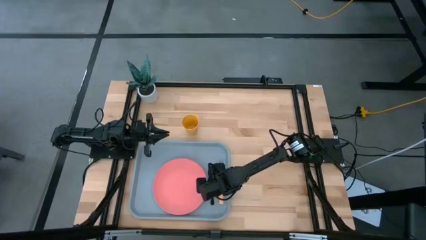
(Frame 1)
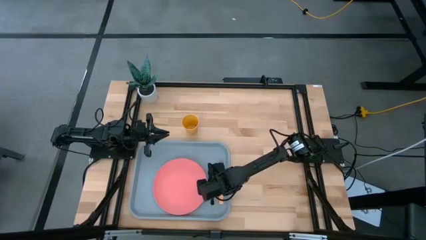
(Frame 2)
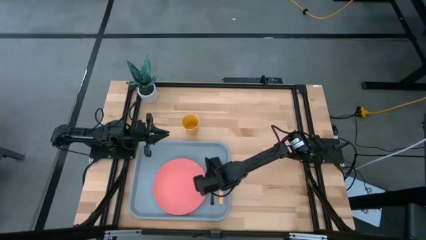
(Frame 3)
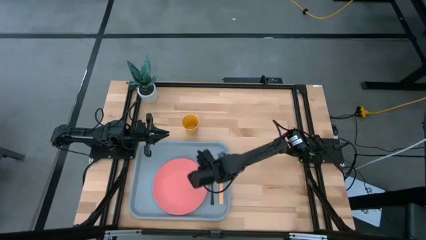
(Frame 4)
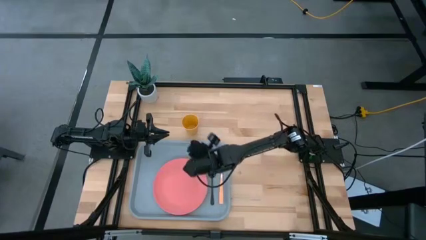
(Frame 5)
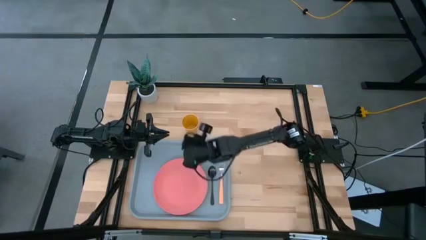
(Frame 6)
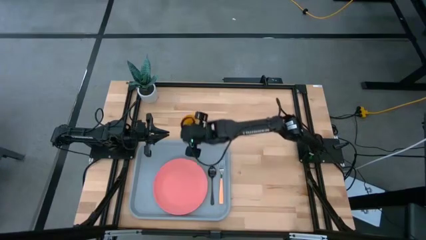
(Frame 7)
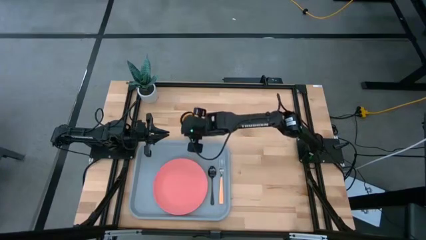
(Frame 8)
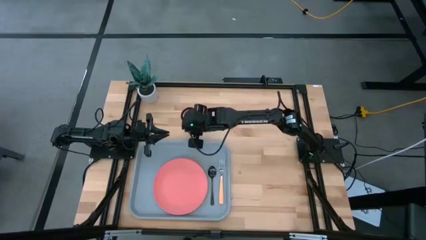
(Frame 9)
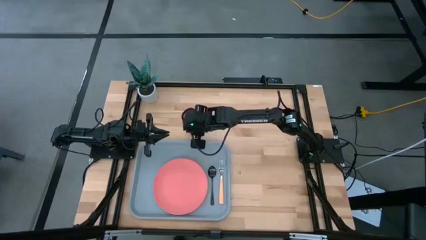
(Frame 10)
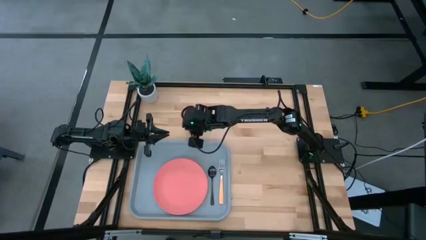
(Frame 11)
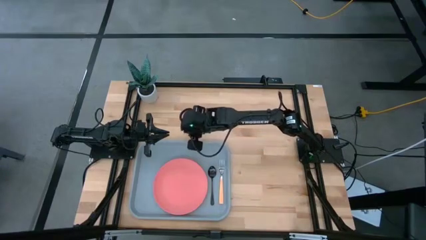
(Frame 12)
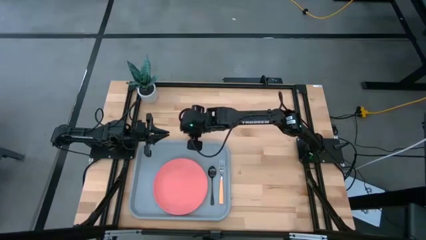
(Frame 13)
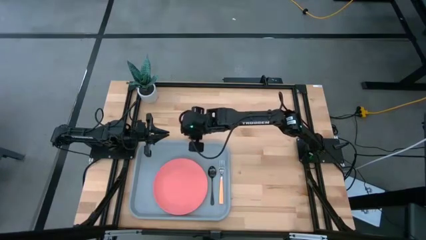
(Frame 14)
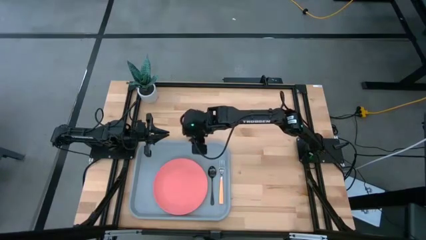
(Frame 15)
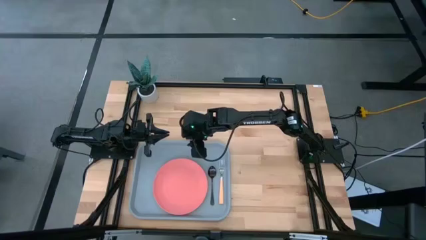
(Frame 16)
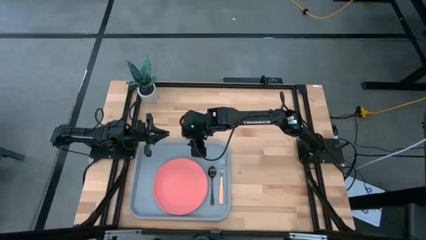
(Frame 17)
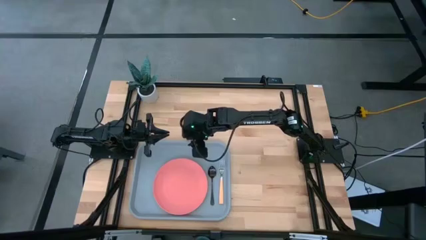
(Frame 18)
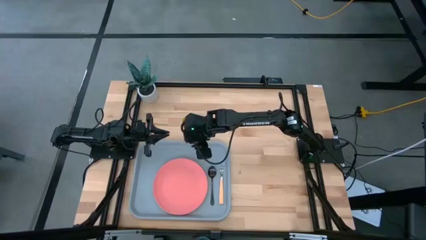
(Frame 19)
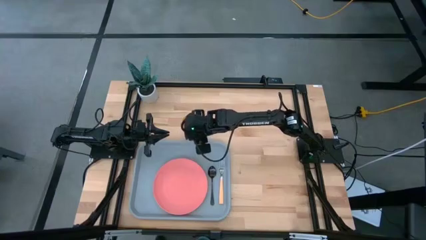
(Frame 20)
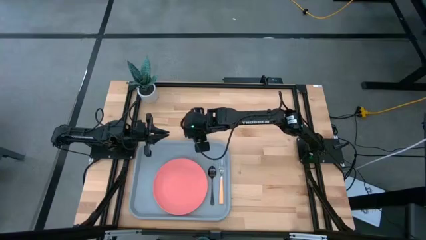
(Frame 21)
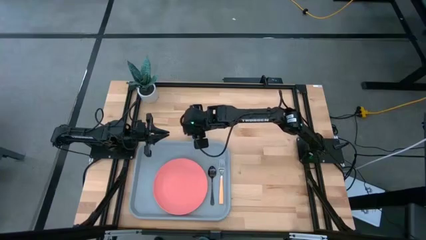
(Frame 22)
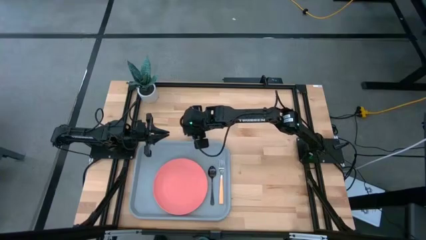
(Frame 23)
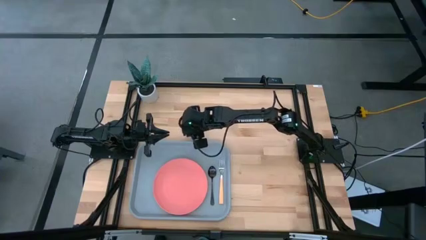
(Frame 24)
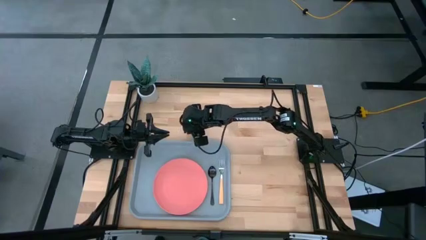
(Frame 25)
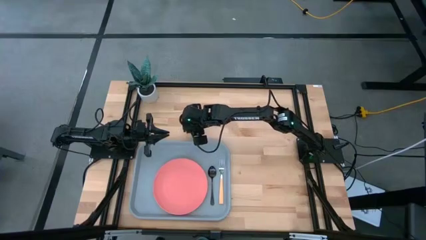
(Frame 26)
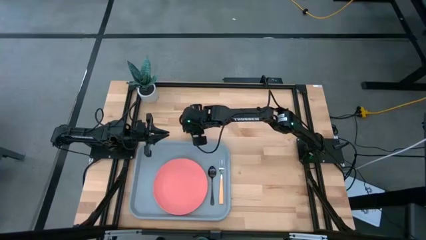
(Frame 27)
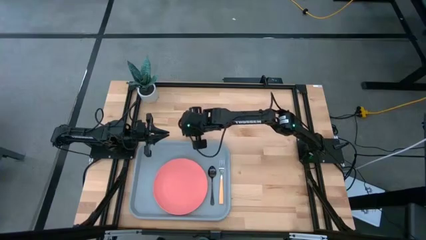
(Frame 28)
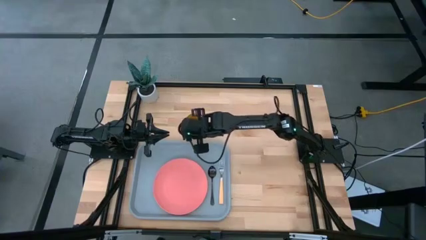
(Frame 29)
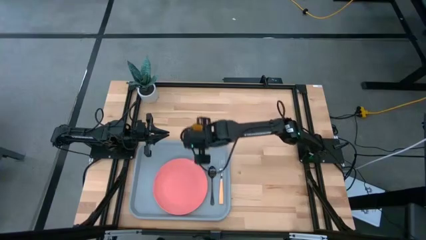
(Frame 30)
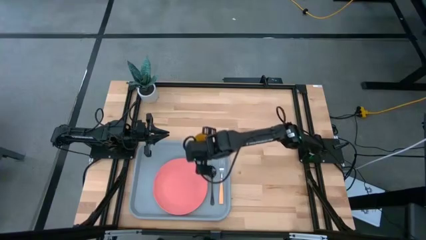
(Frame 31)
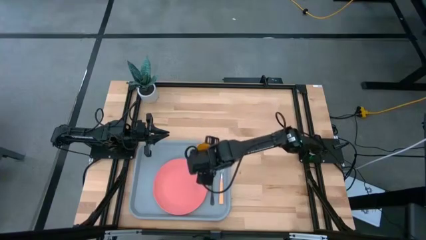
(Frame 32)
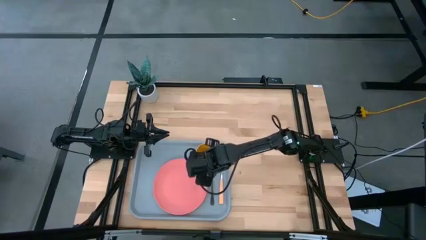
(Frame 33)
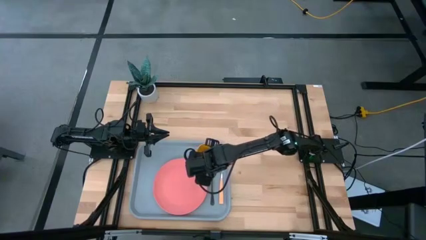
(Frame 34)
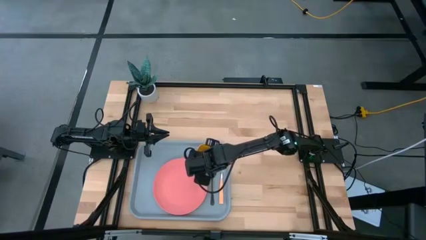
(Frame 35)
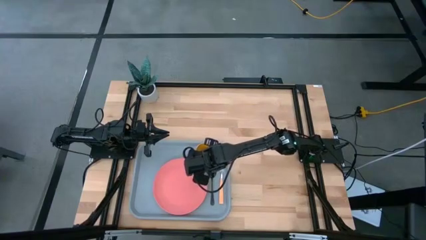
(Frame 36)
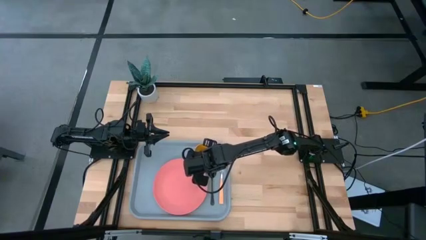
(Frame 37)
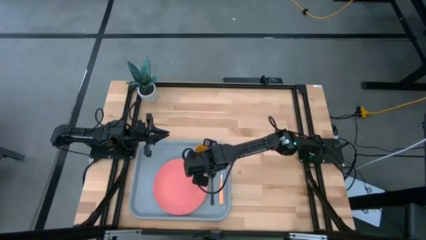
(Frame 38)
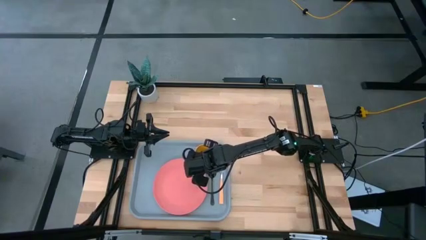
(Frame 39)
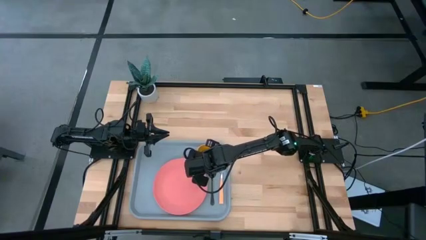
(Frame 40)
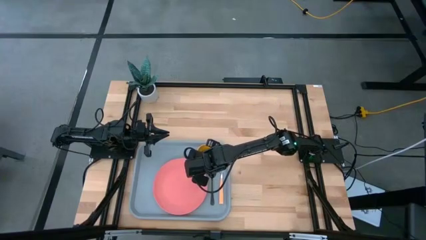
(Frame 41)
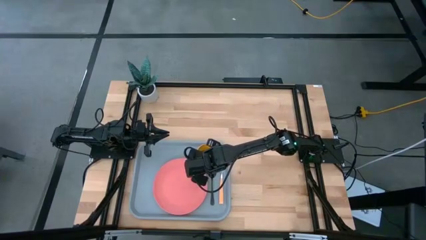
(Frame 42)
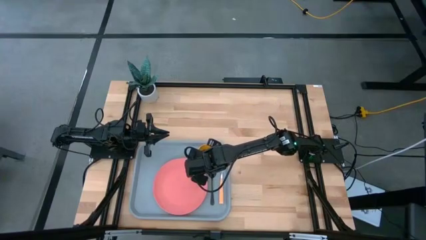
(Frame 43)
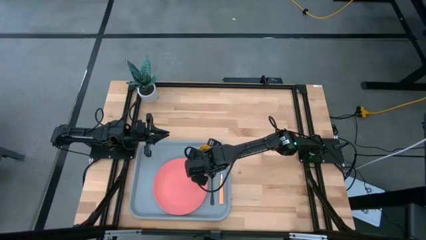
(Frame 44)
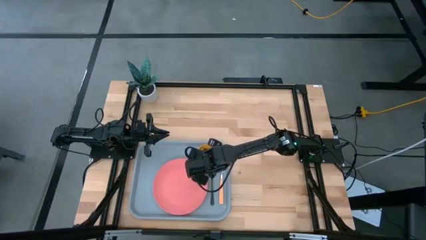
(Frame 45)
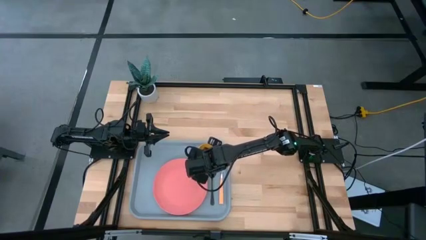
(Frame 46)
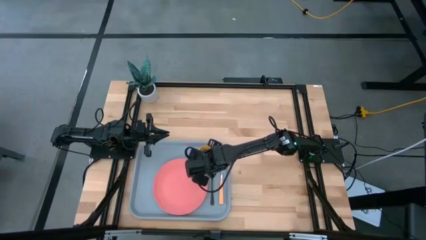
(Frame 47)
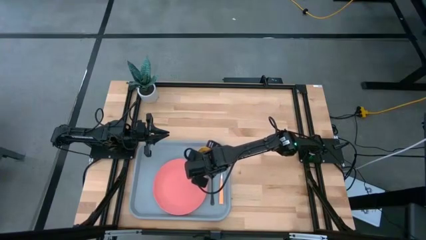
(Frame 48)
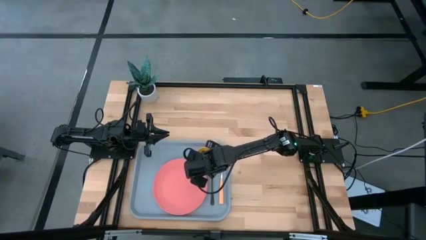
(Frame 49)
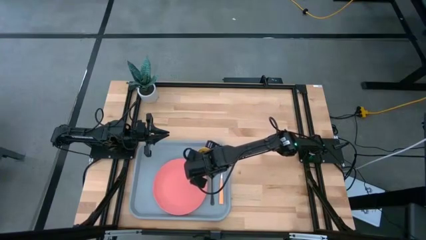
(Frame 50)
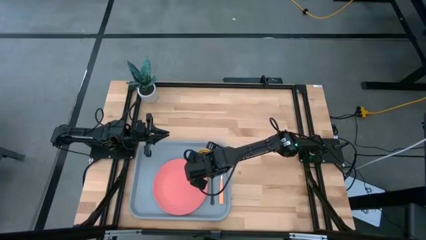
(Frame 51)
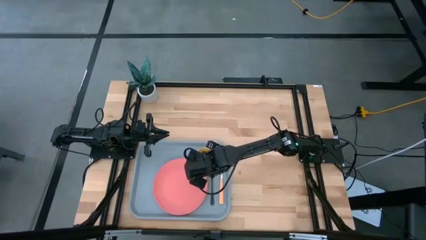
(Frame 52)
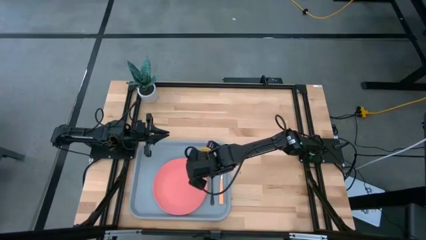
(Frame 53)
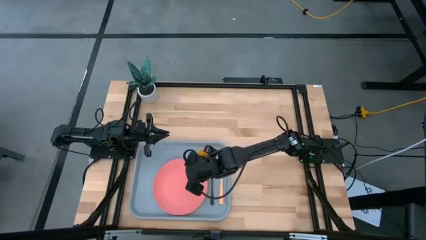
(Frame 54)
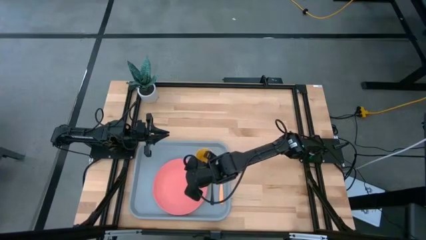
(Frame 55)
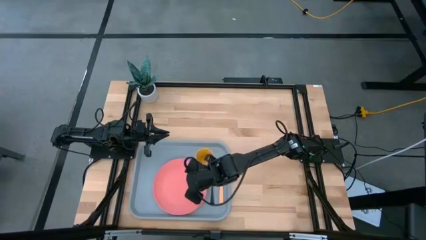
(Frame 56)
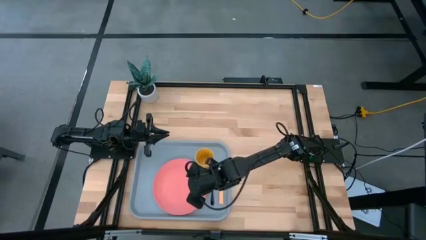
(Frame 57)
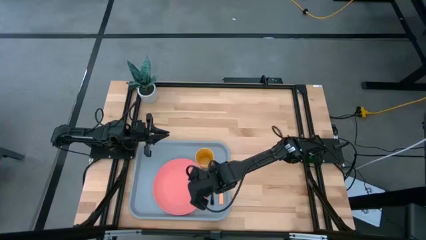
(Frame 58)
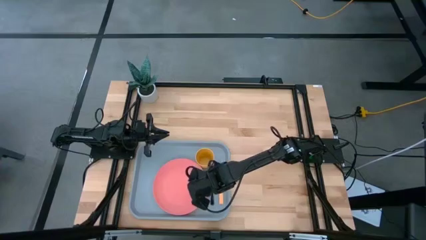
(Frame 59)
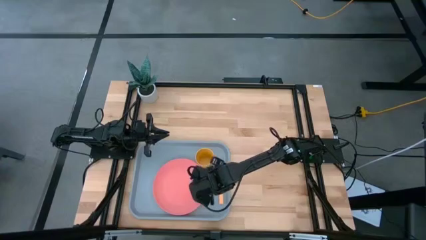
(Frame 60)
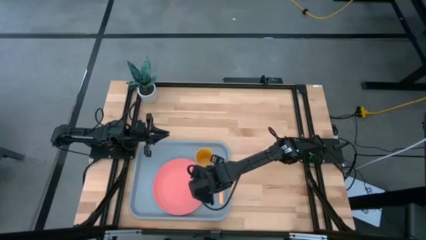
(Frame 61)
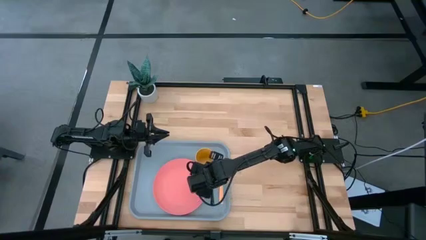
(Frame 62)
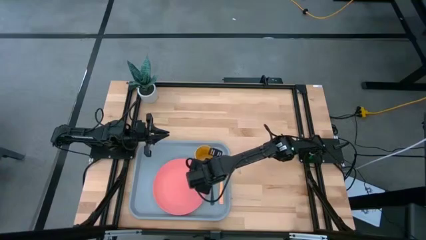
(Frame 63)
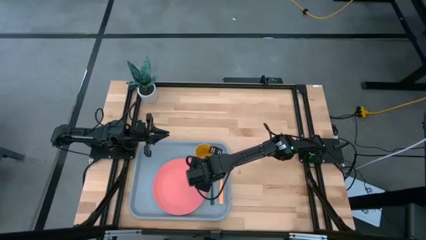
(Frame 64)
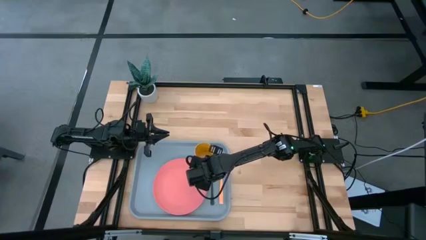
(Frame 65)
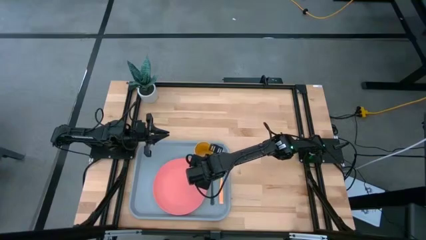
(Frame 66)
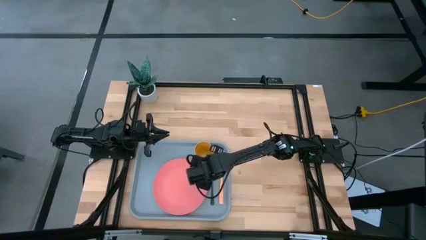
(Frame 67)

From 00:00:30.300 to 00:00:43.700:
Task: Pick and place plate/cup/fork/spoon on tray
Put the yellow cup to the top right of the pink plate on the grey tray

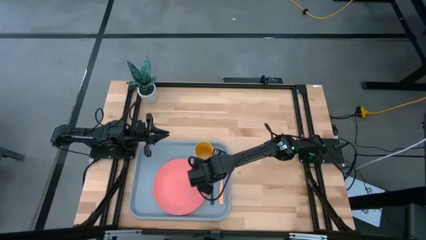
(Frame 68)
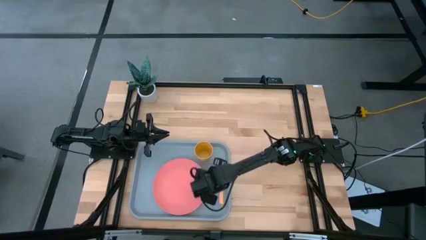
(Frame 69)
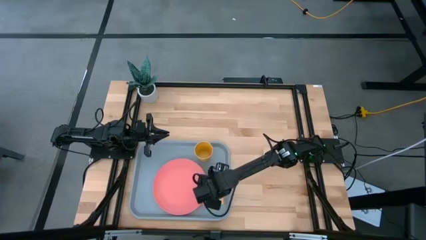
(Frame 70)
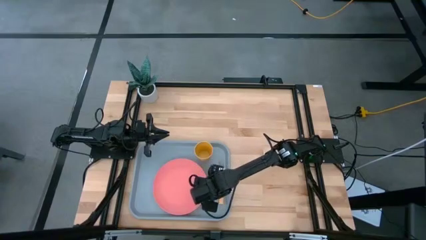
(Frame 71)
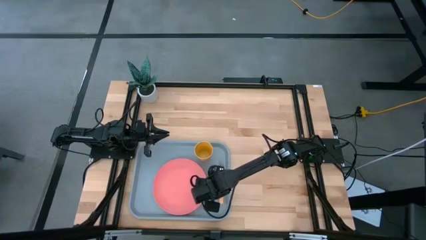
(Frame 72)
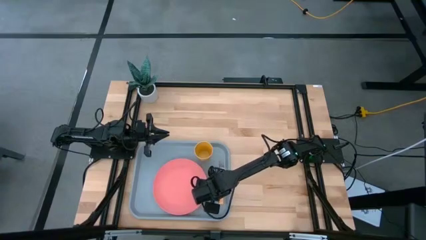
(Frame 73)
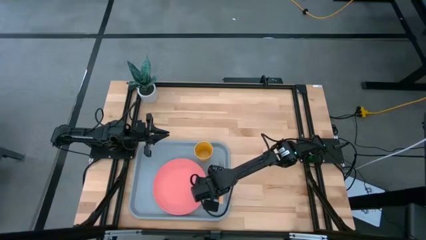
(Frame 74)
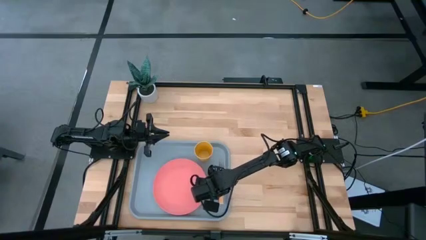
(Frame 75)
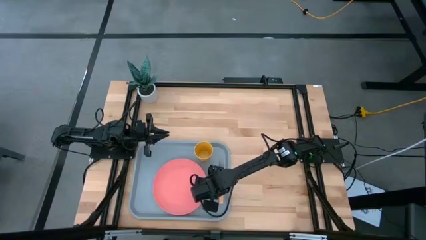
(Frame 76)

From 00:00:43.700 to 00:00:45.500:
Adjust the black spoon on the grey tray

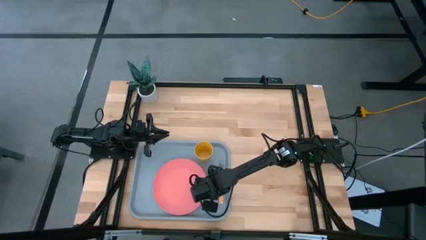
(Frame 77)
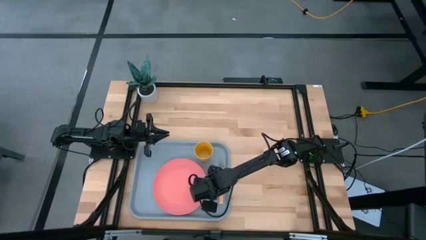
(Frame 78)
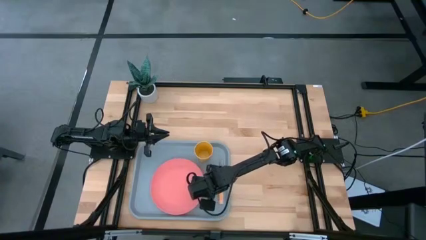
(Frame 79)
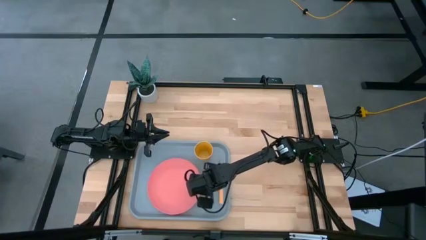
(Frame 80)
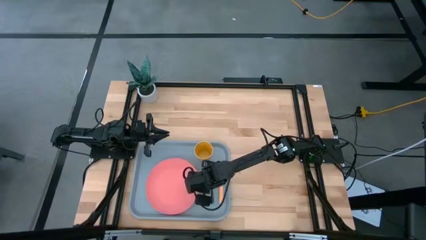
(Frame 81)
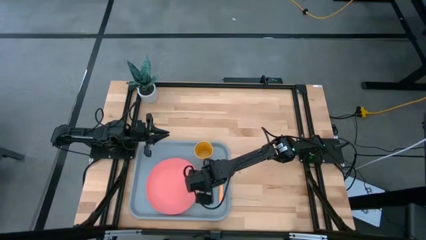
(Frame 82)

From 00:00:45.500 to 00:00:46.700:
Adjust the pink plate on the grey tray
